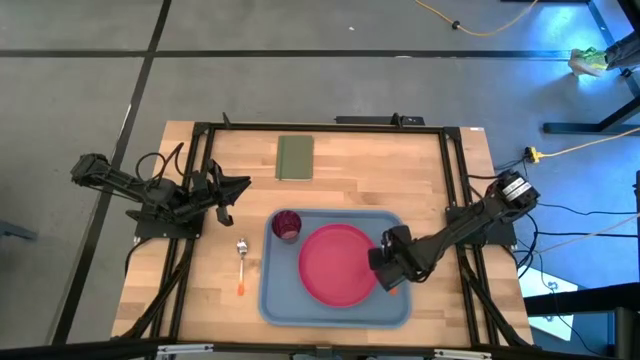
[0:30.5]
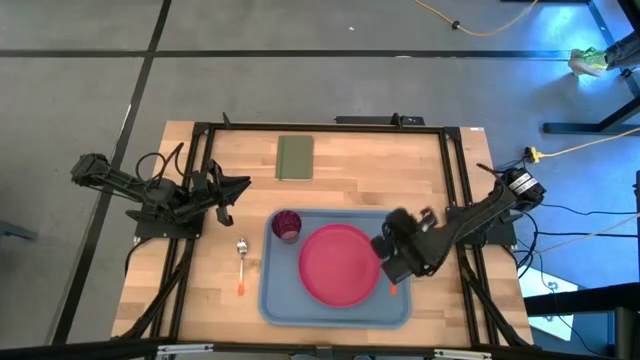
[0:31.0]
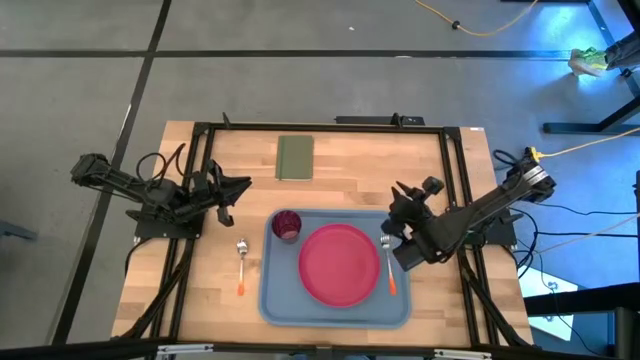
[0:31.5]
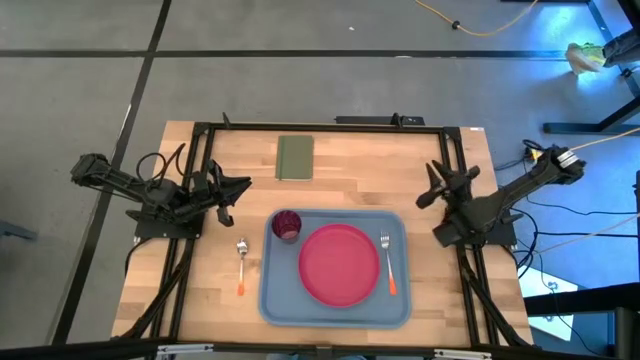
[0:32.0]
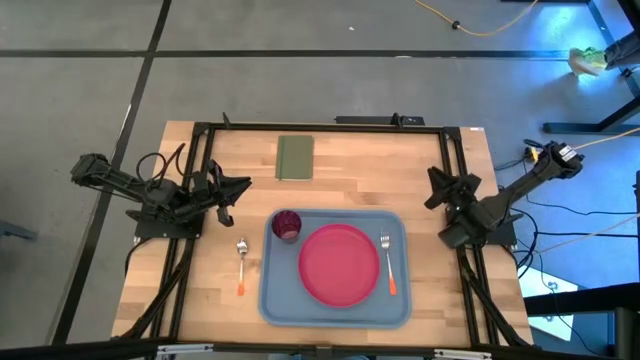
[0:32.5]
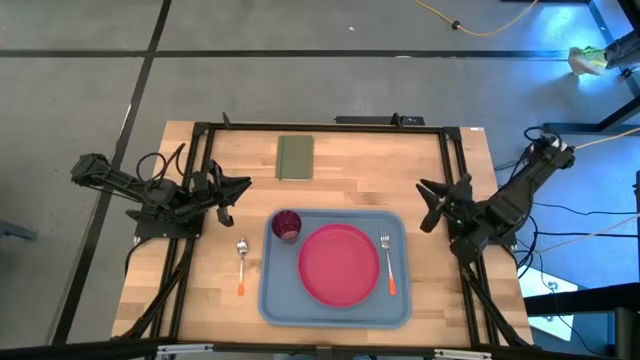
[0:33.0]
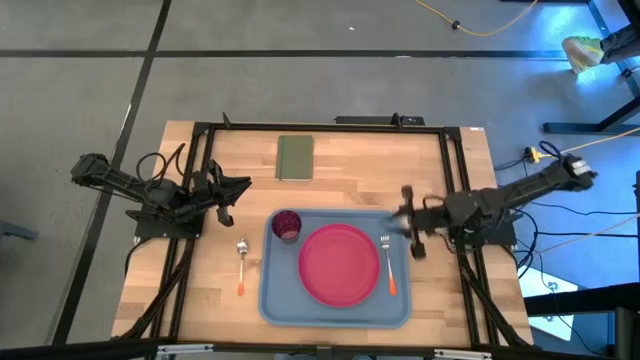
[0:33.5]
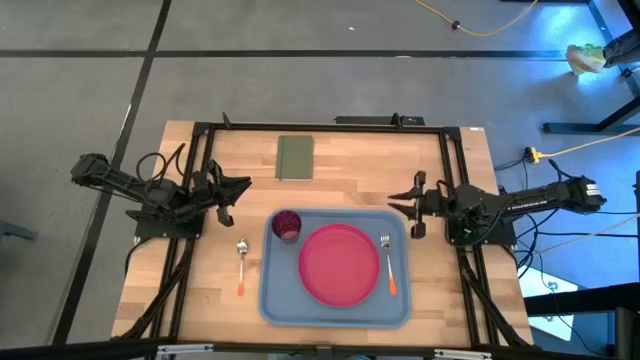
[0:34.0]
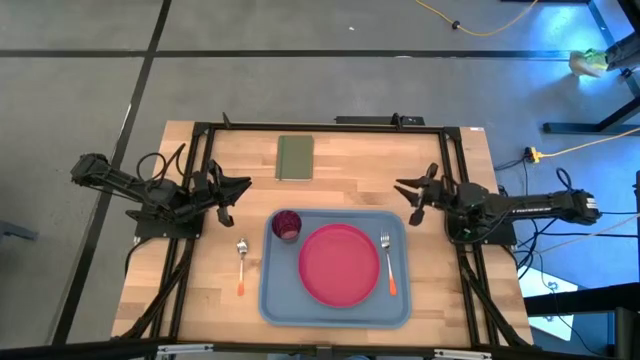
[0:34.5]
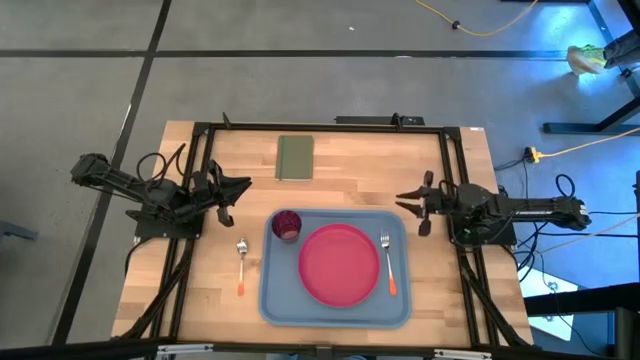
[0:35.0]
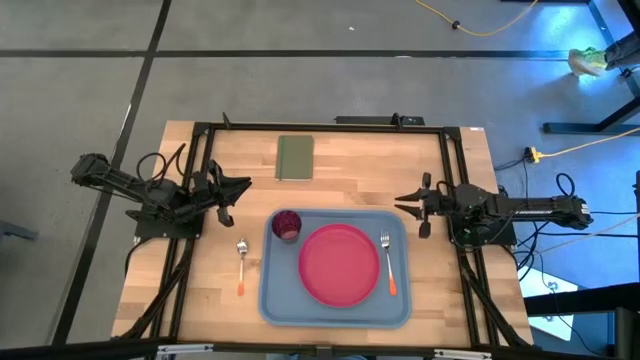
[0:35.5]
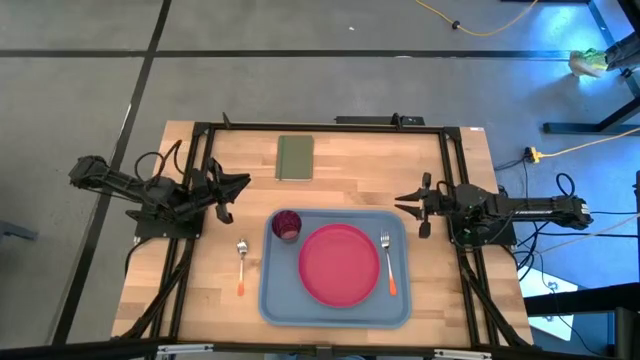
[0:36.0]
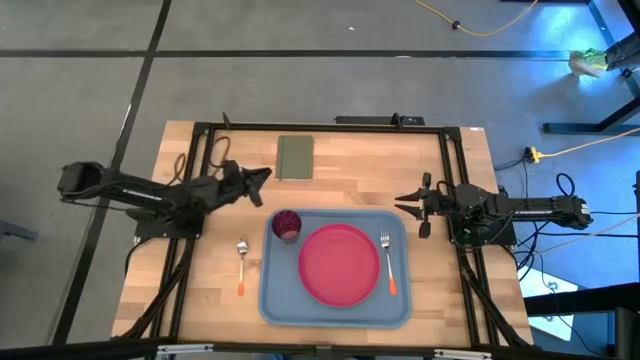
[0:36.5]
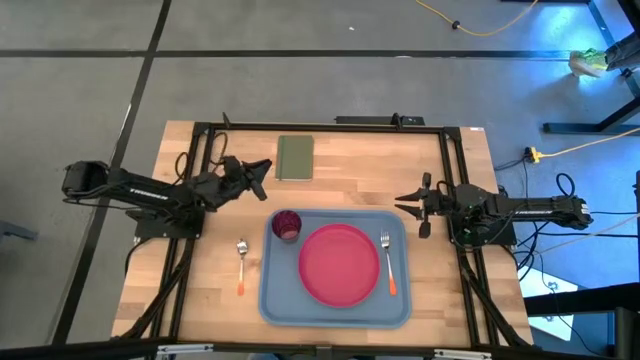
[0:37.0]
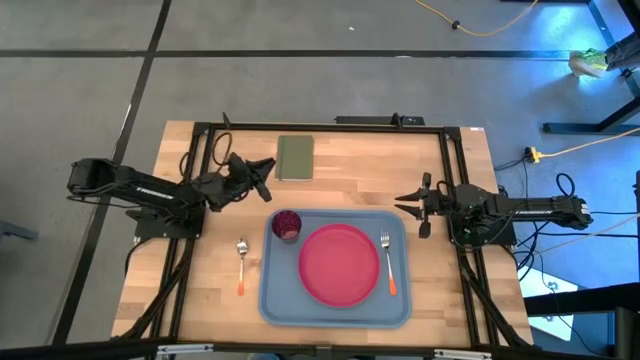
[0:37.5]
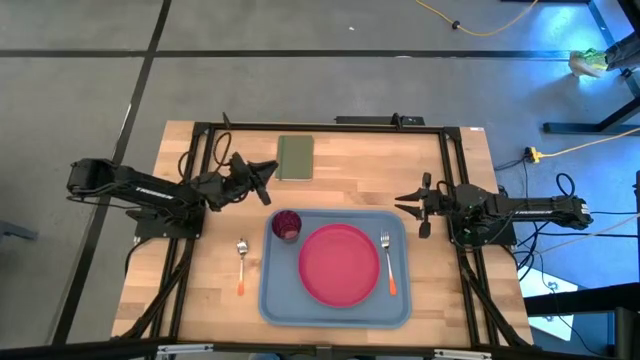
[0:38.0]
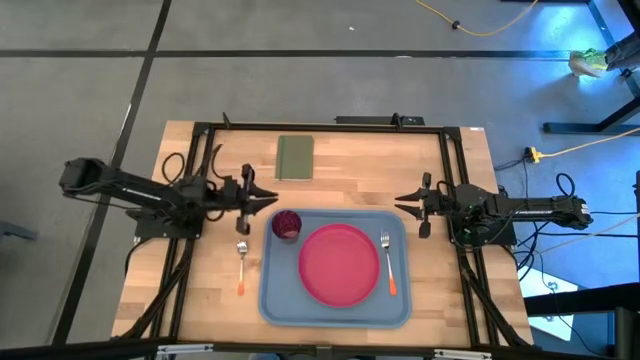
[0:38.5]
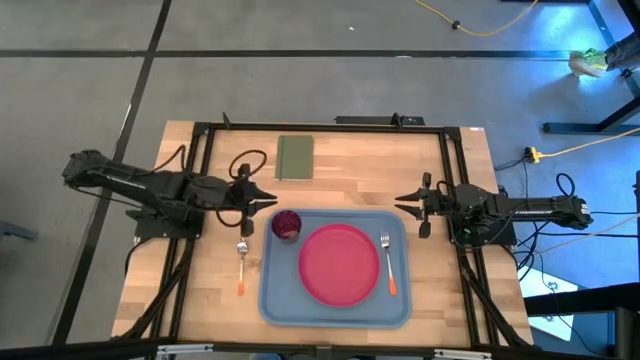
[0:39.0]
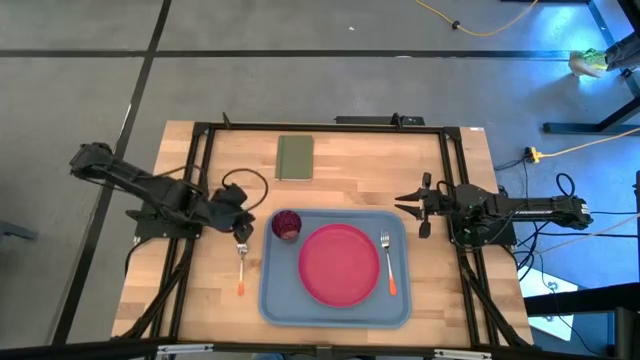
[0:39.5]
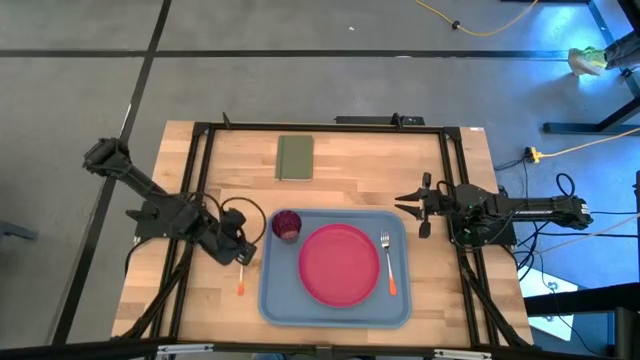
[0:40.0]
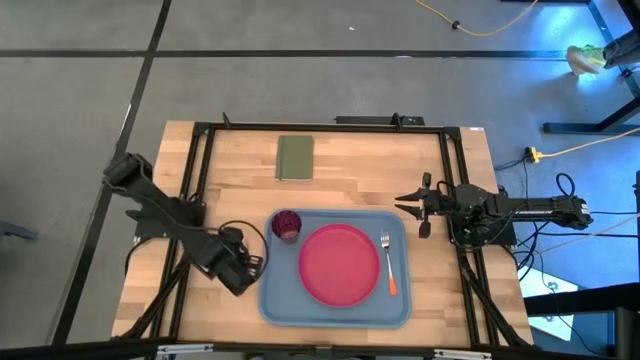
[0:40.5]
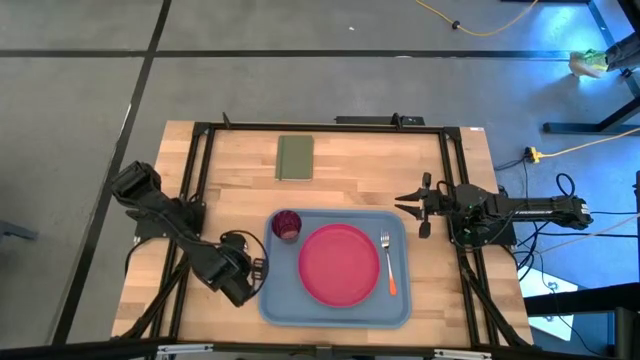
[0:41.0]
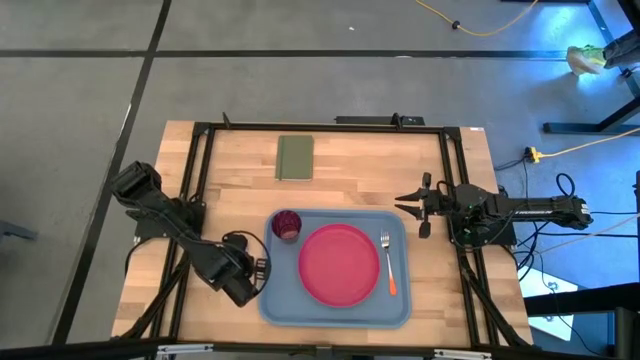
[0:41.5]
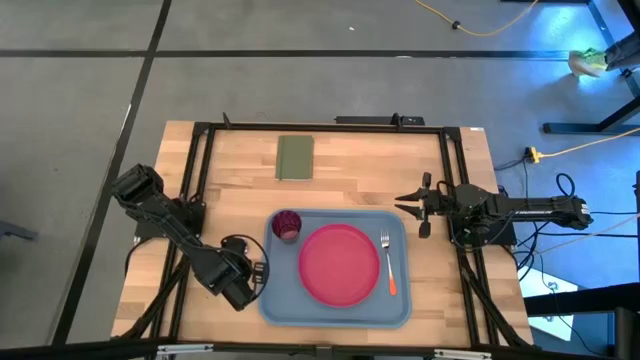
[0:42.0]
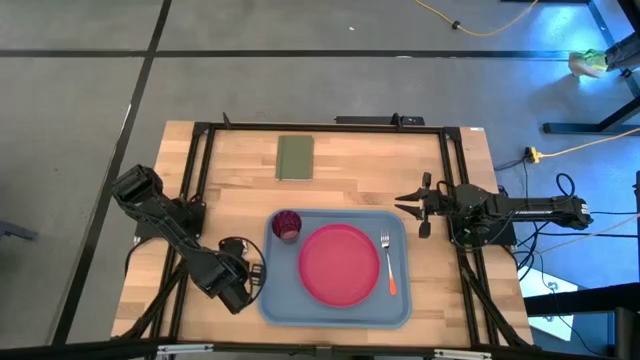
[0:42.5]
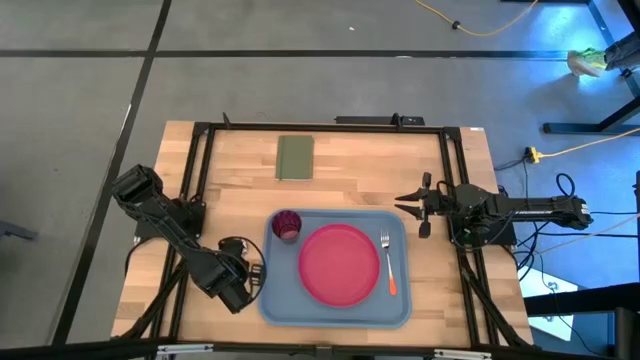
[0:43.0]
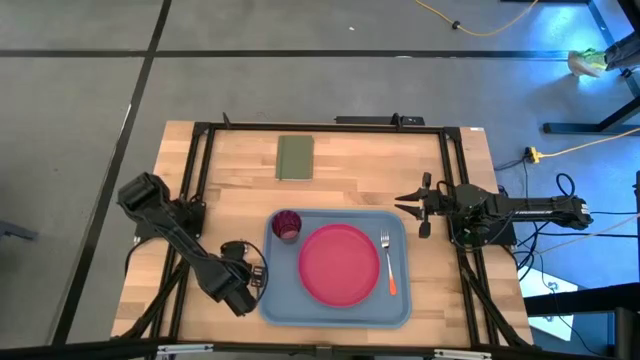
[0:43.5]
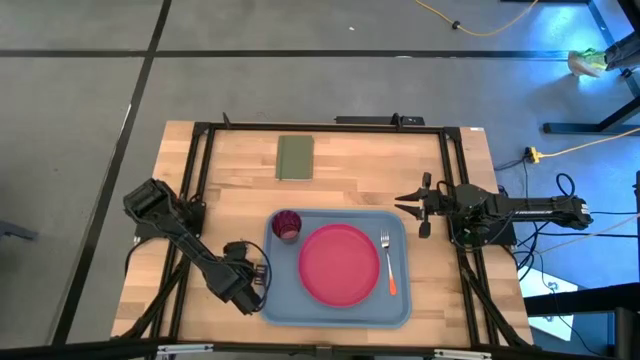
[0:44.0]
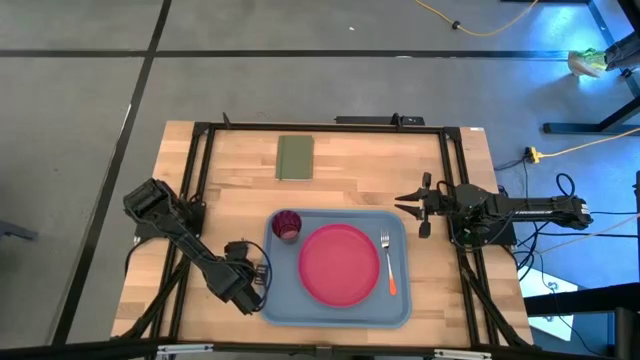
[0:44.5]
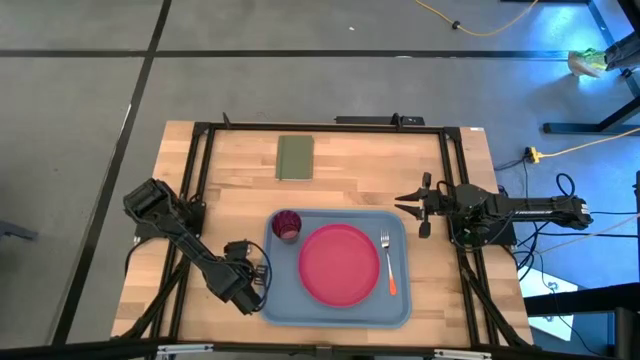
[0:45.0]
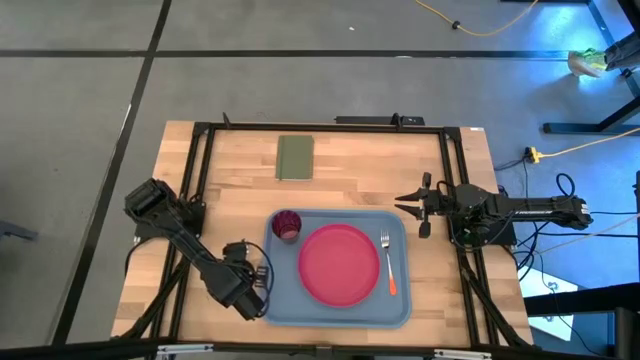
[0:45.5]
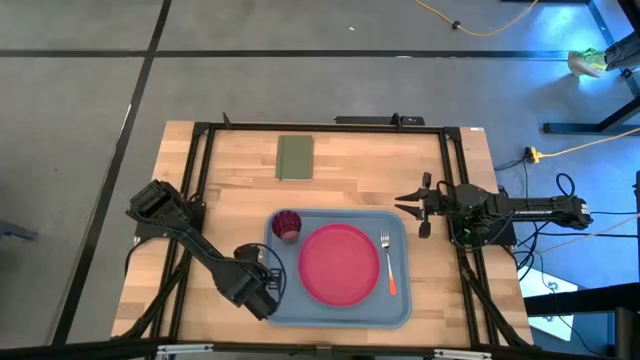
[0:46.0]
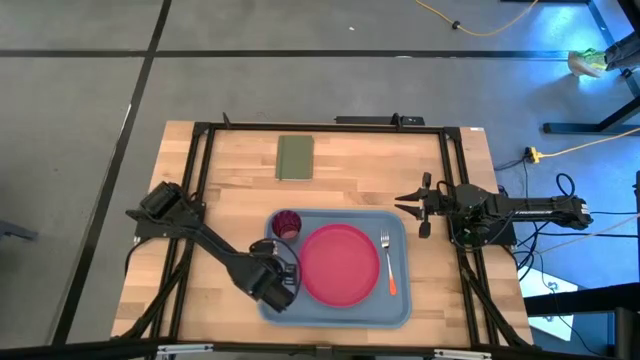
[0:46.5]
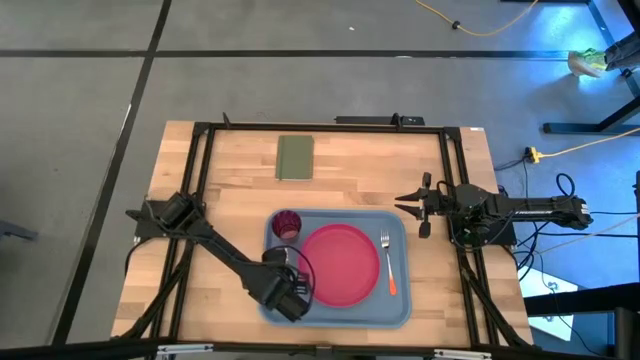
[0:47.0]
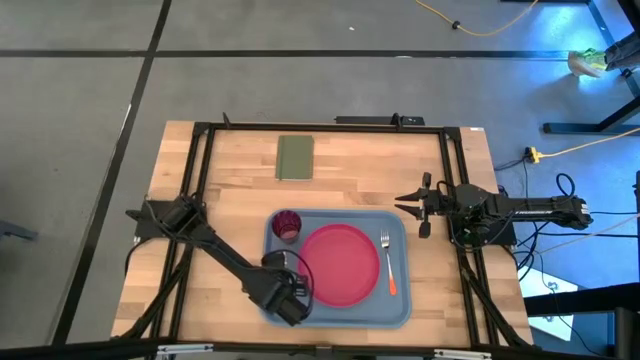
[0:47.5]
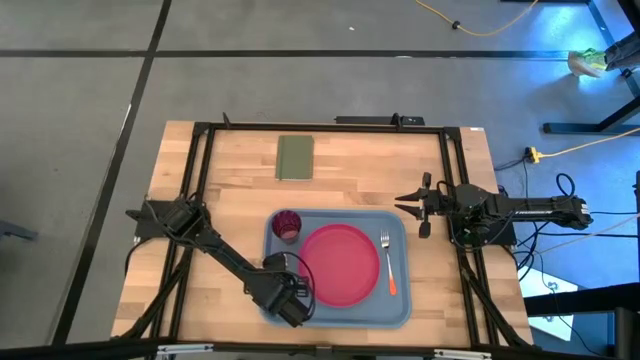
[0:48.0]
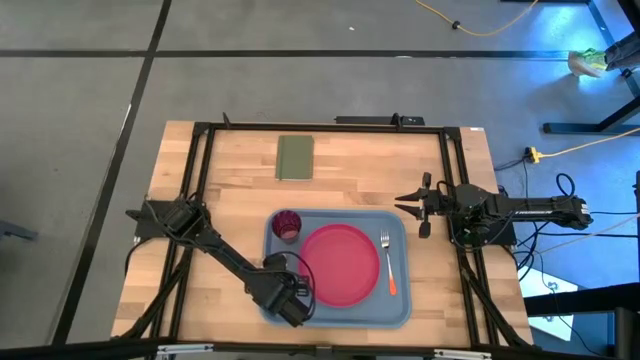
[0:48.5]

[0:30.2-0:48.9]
Task: Pick and place plate/cup/fork/spoon on tray
Put the orange spoon on the blue tray to the left of the pink plate

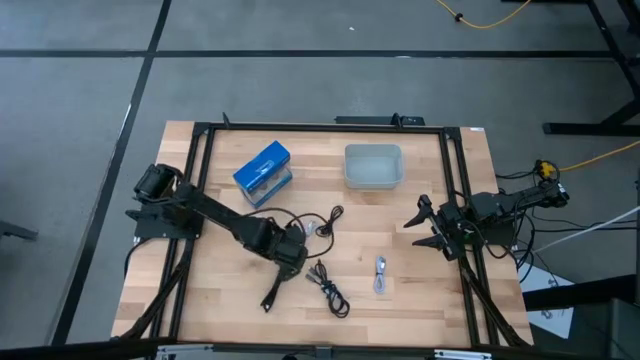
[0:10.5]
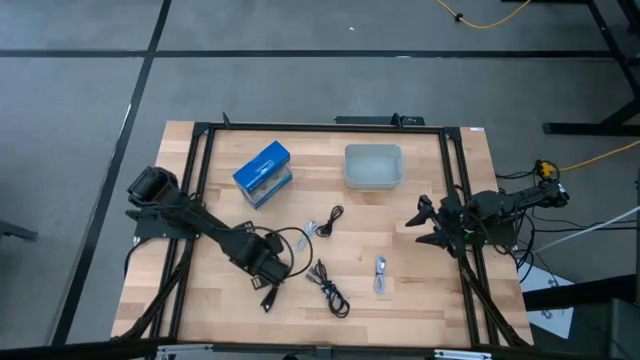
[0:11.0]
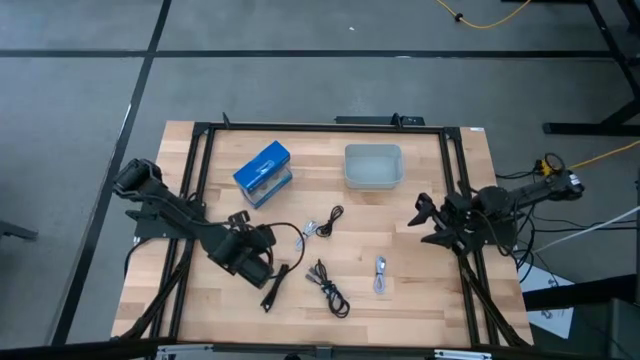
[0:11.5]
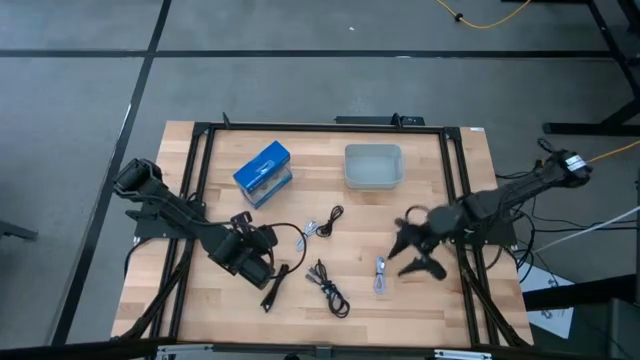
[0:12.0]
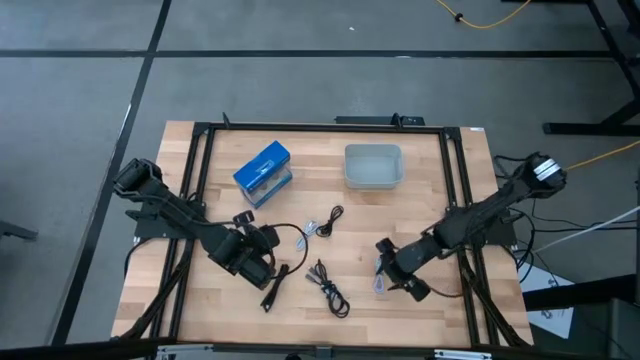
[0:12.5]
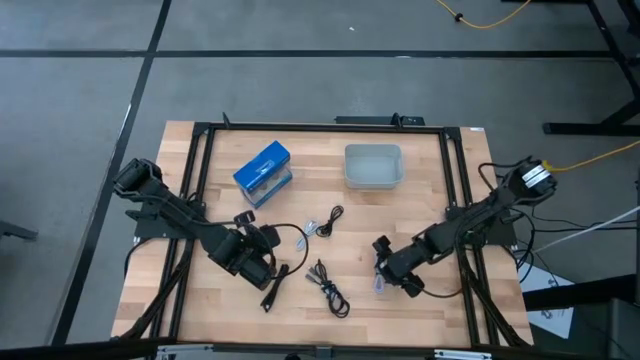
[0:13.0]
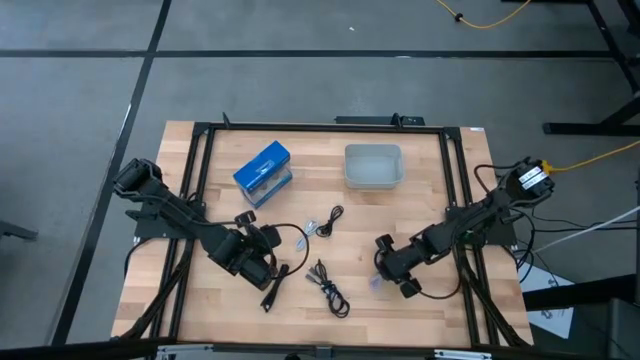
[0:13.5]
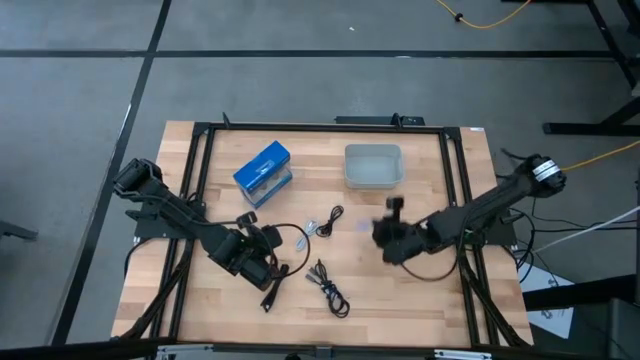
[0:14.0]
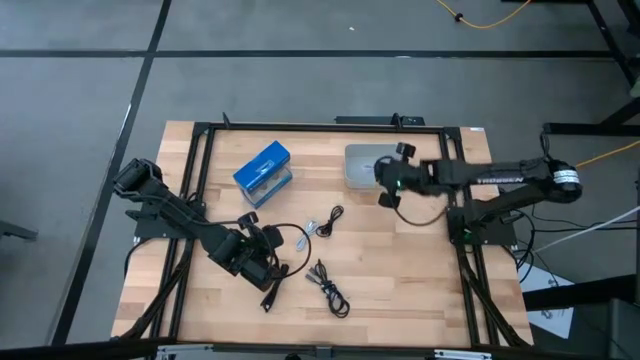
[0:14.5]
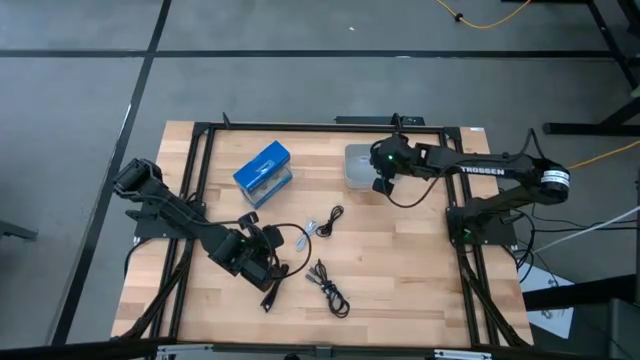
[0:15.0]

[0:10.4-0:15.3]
Task: Pick and place USB-C Cables
Put the purple charger cable into the gray bin
